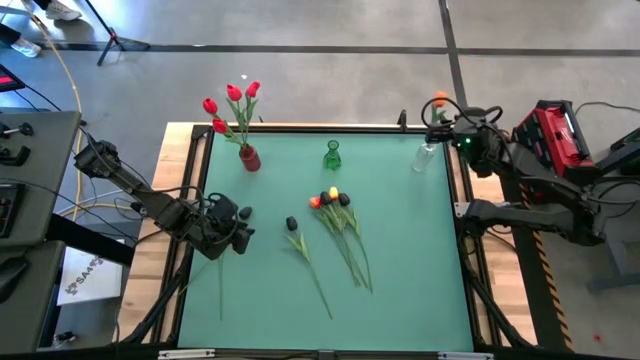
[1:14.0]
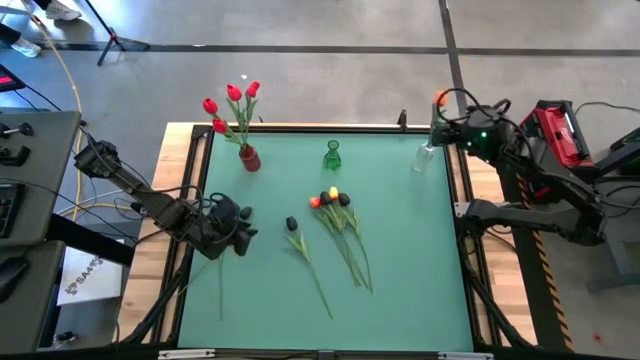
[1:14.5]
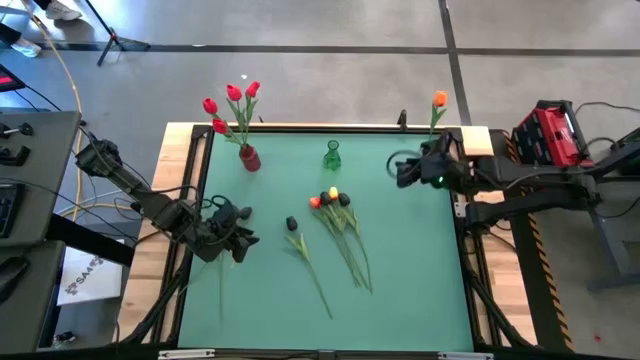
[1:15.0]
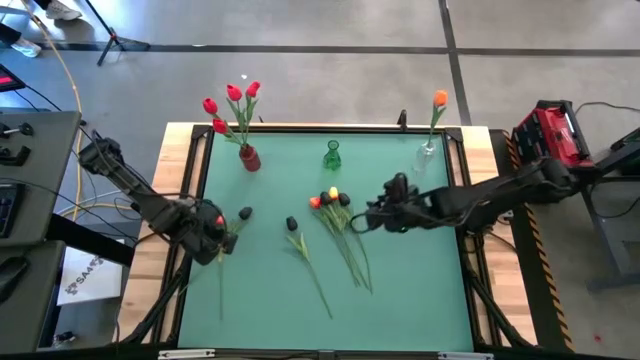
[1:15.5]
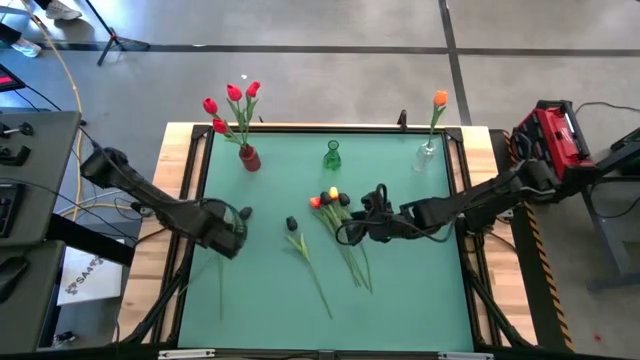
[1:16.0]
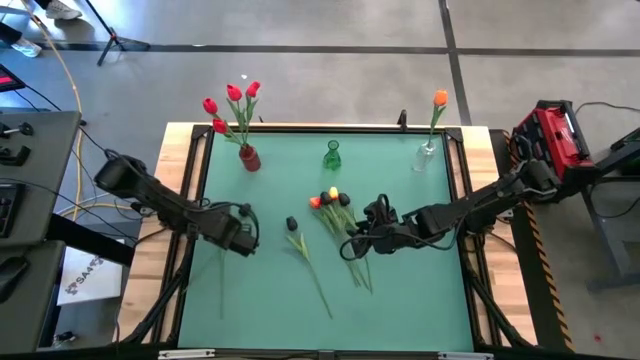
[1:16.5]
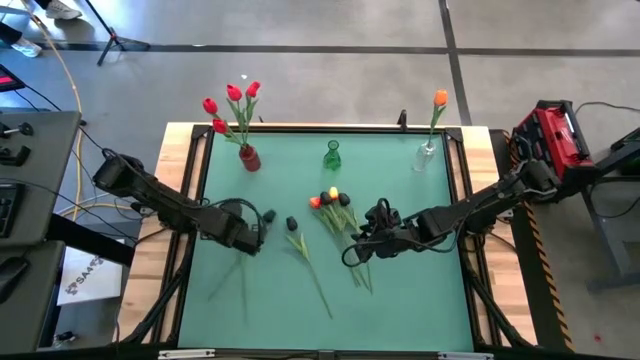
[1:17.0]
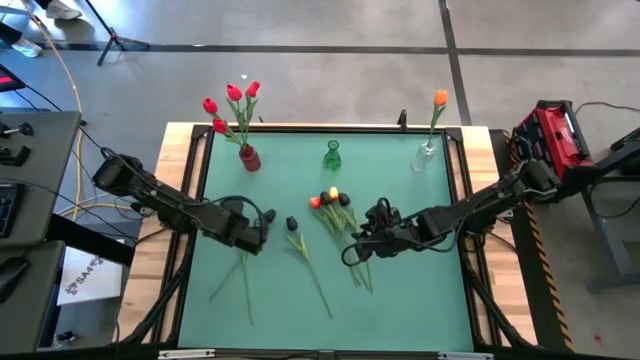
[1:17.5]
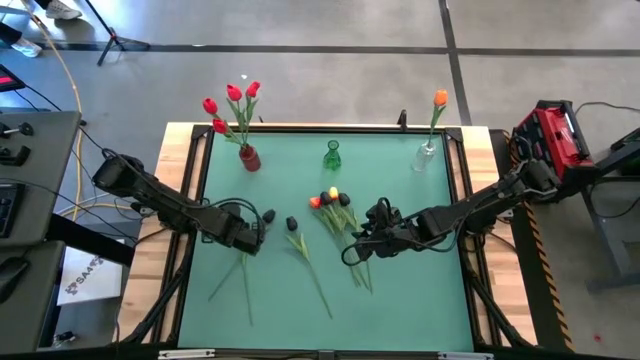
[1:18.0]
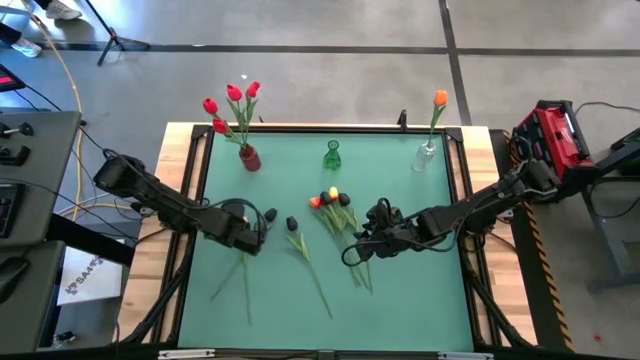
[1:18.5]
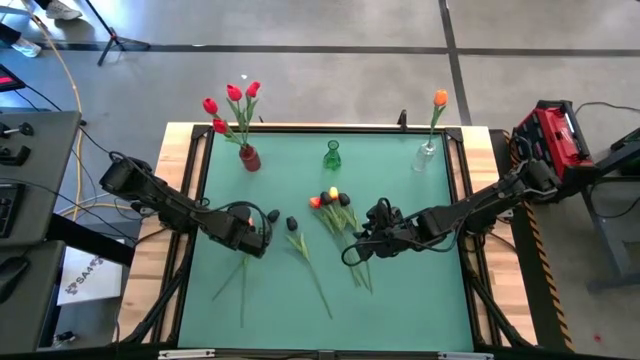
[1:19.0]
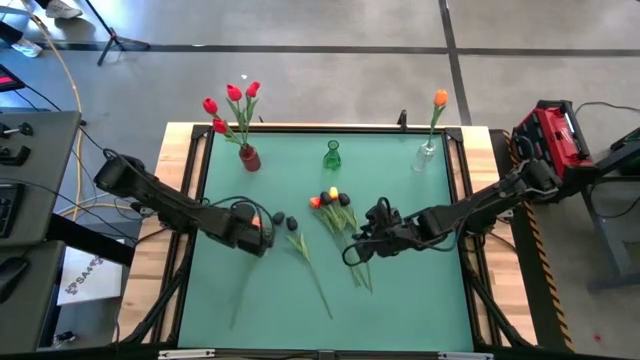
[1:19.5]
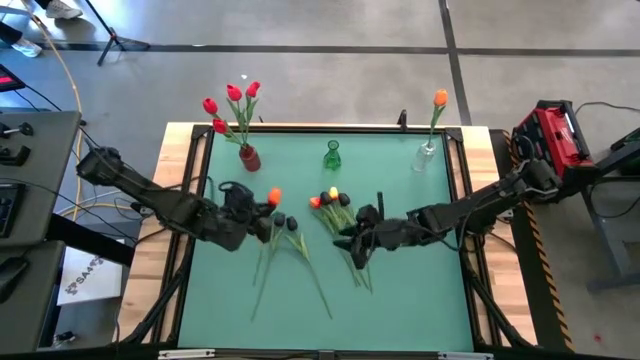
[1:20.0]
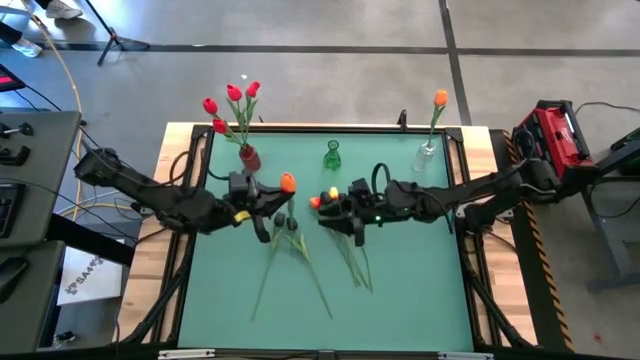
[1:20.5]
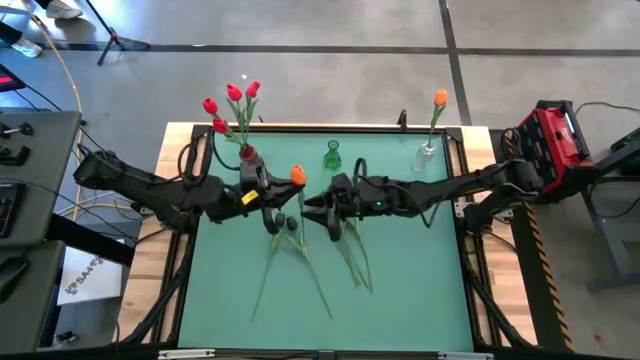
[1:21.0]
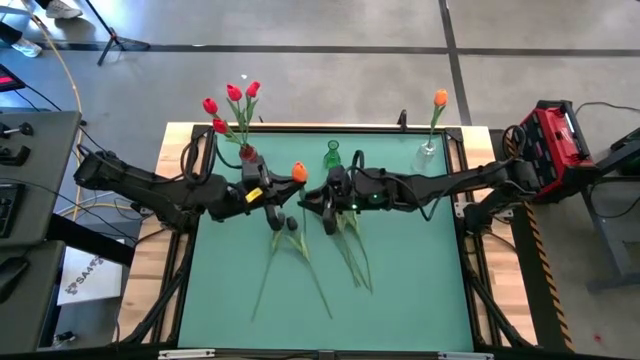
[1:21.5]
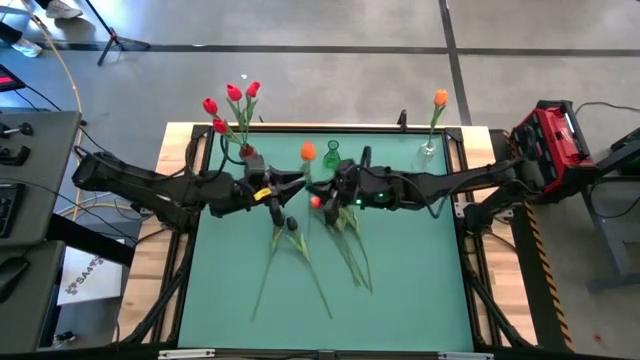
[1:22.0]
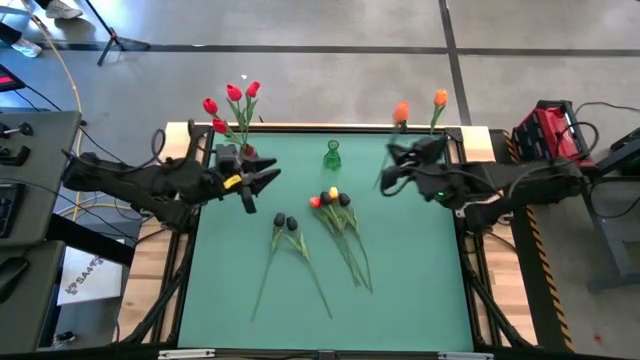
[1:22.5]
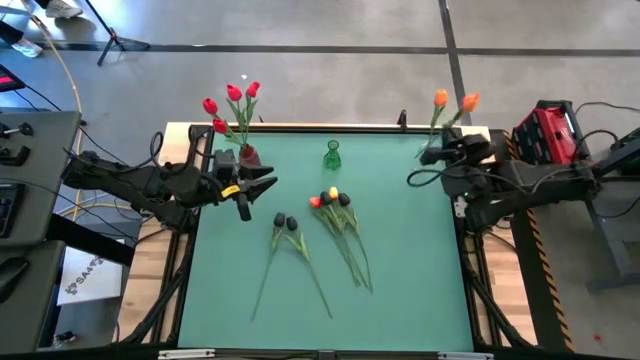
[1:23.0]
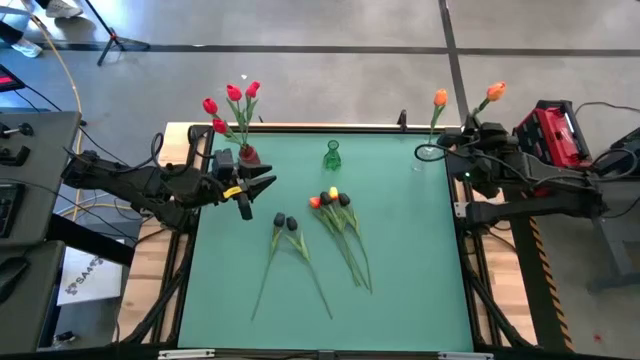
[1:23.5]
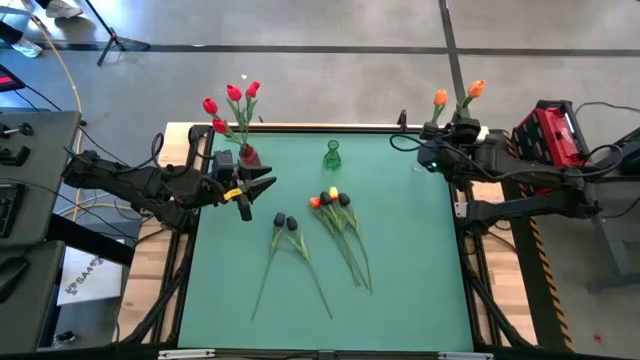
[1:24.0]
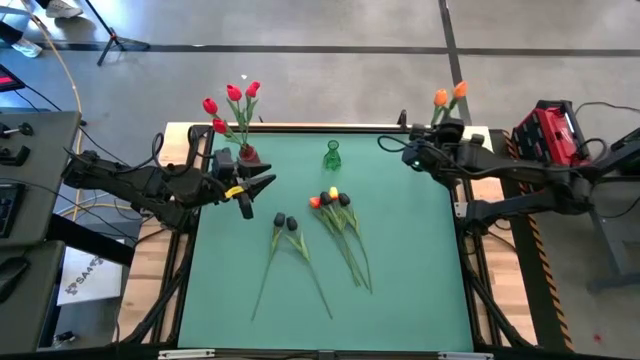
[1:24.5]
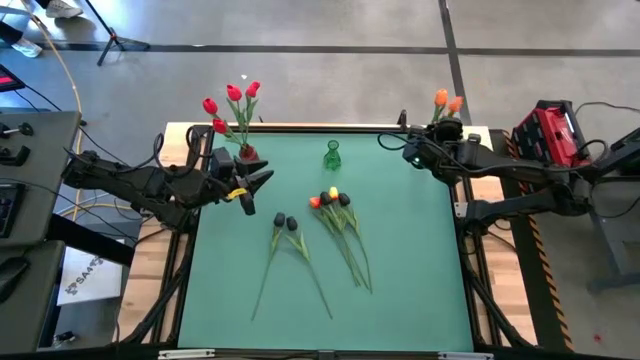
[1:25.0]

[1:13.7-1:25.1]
Task: Sort flowers into vase by color
Put the orange tulip into the transparent vase

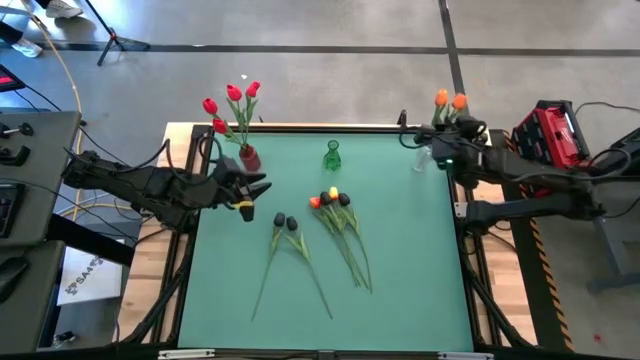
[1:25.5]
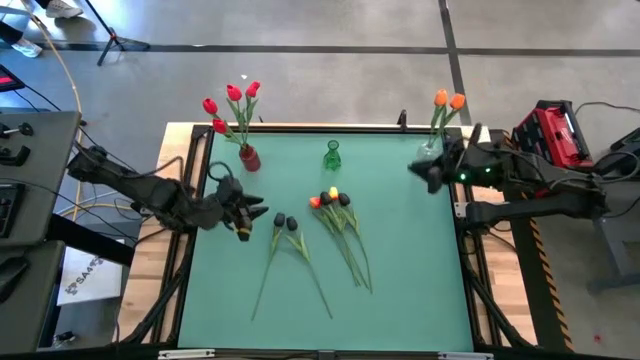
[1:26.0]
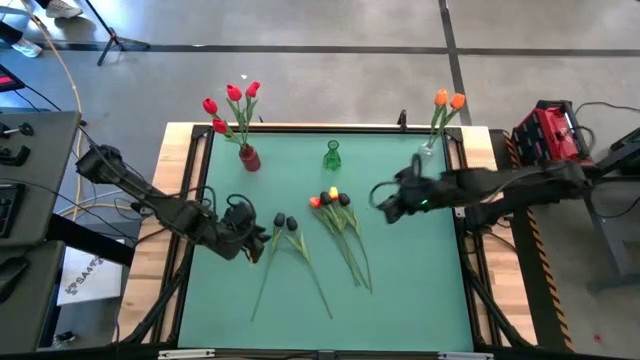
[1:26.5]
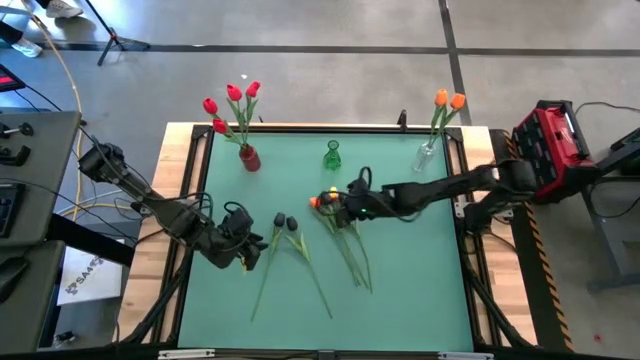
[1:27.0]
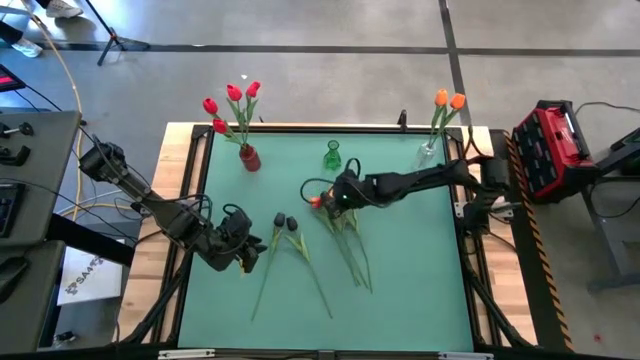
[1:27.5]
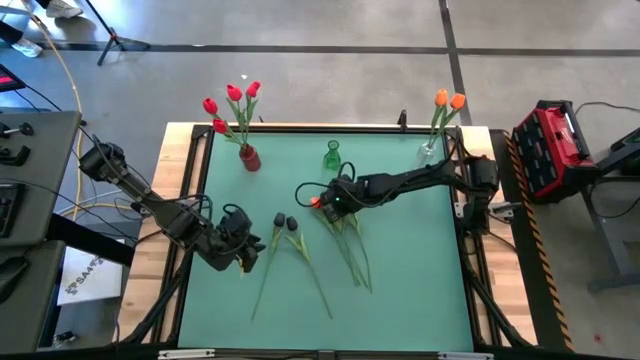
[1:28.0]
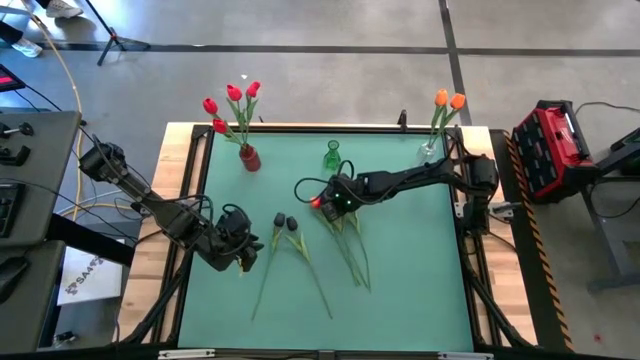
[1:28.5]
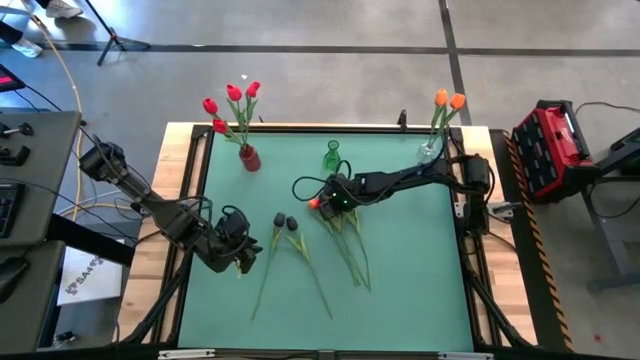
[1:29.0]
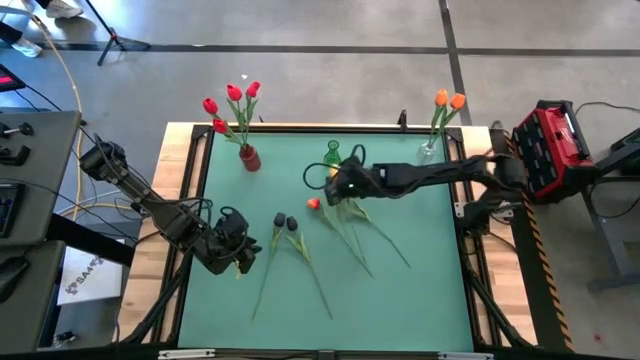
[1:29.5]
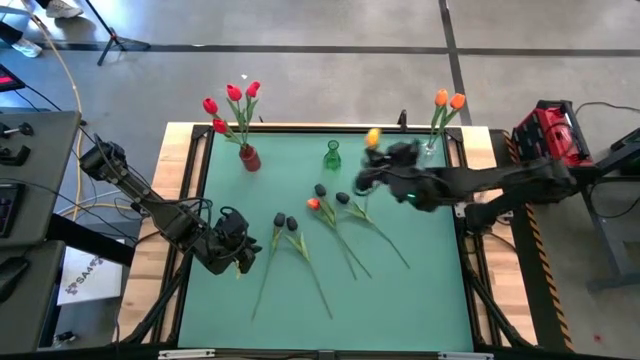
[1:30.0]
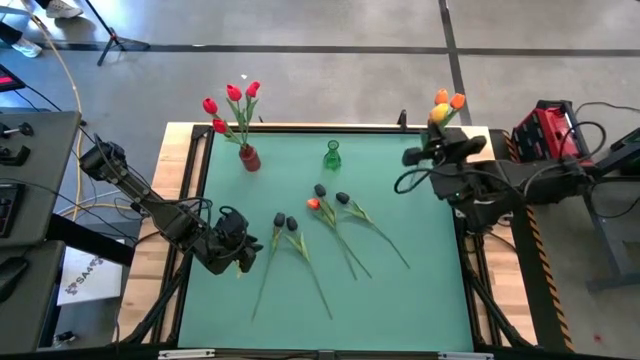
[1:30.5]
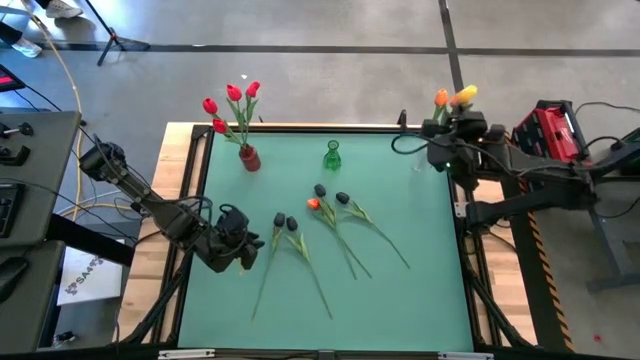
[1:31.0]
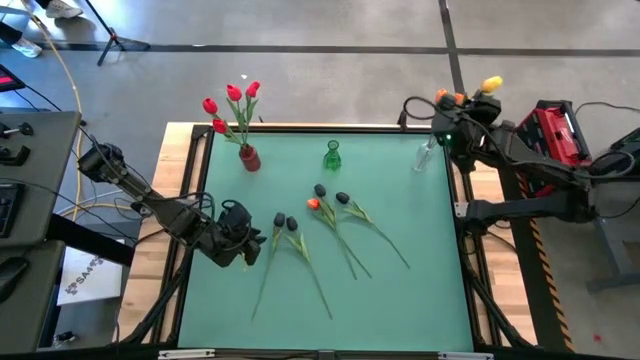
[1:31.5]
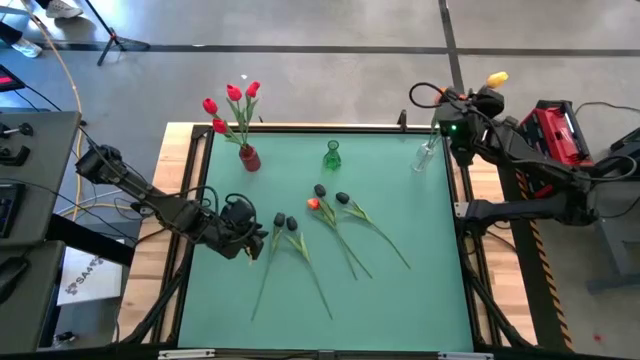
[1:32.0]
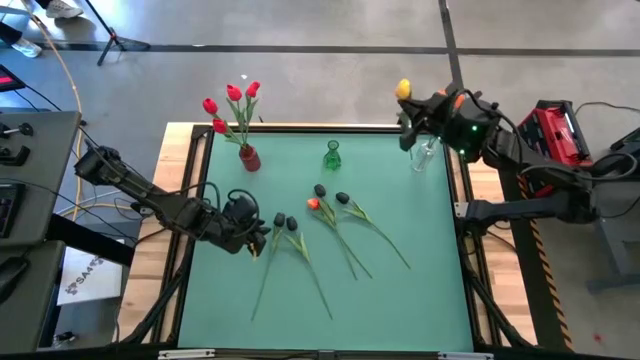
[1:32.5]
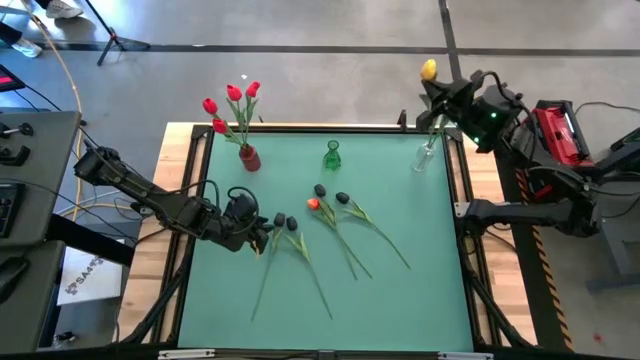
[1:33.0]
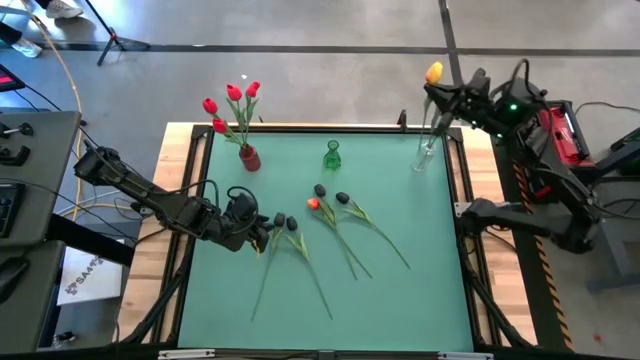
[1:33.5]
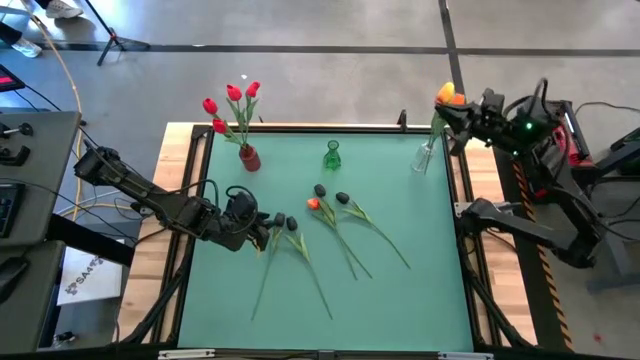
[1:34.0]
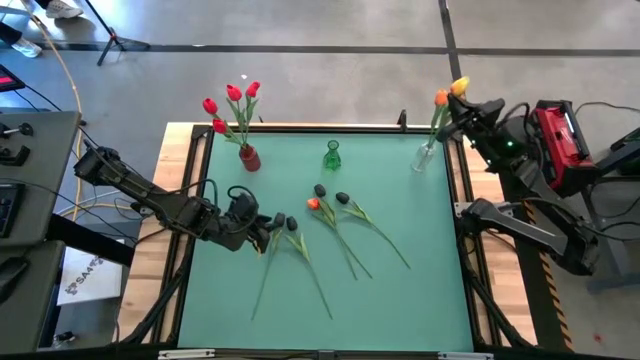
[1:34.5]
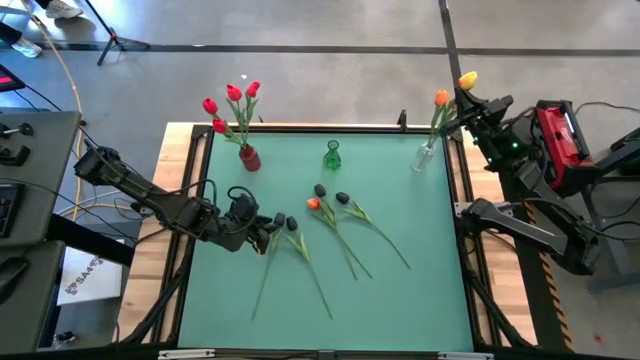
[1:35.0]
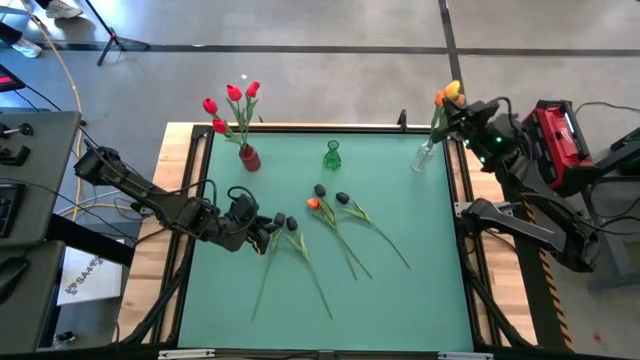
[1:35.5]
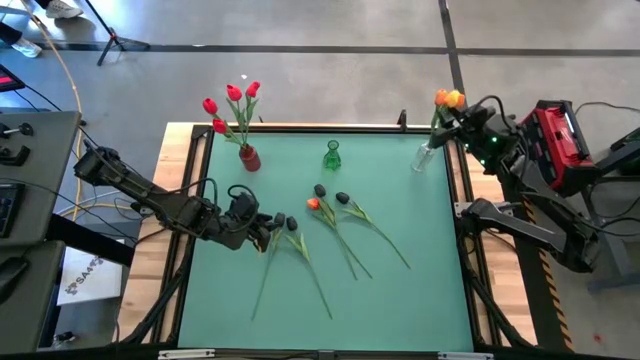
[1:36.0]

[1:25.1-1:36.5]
Put the orange tulip into the transparent vase
